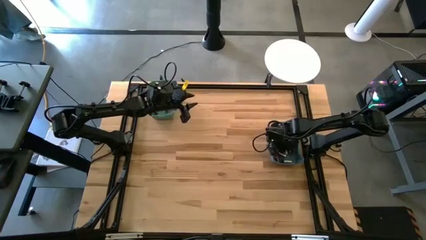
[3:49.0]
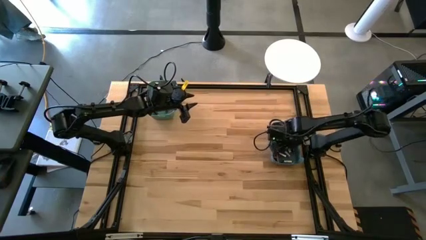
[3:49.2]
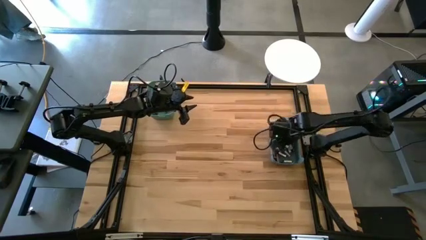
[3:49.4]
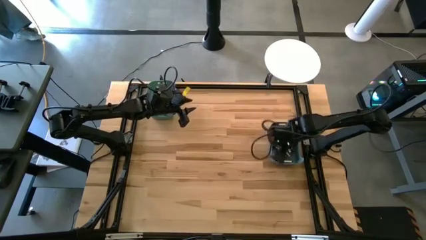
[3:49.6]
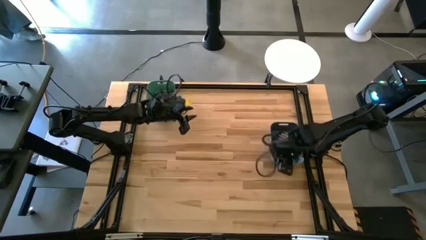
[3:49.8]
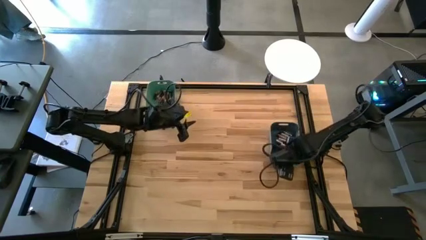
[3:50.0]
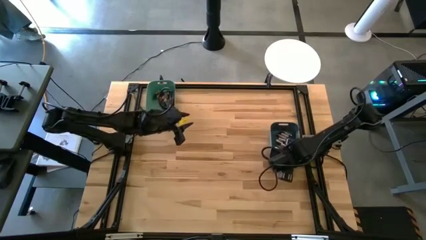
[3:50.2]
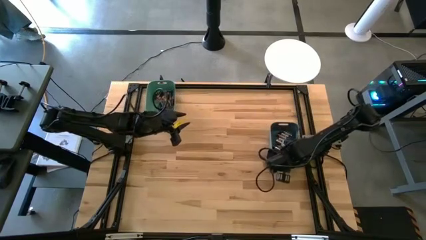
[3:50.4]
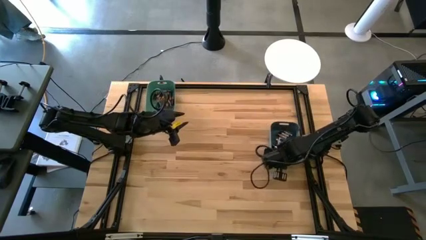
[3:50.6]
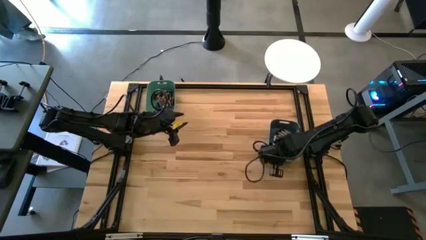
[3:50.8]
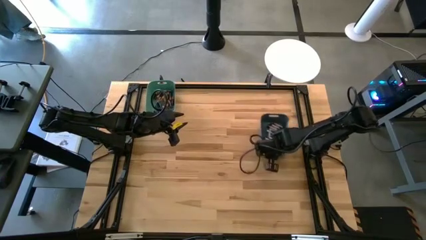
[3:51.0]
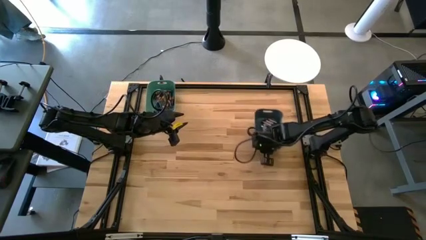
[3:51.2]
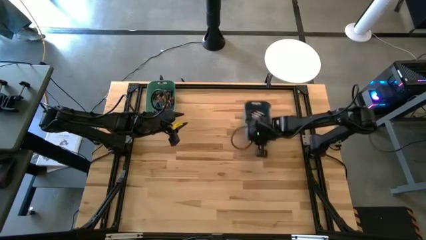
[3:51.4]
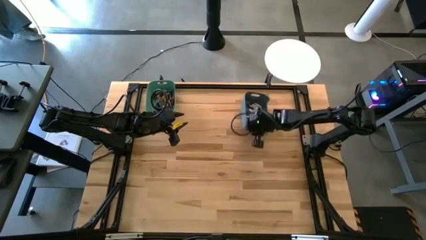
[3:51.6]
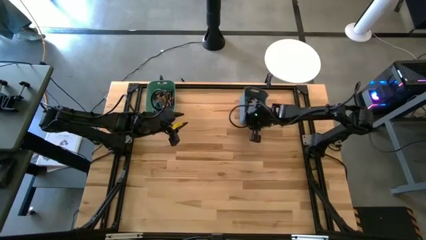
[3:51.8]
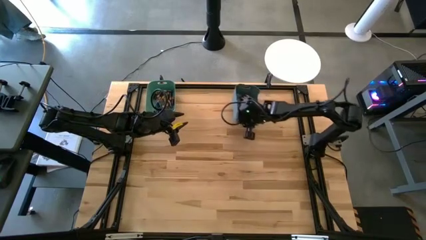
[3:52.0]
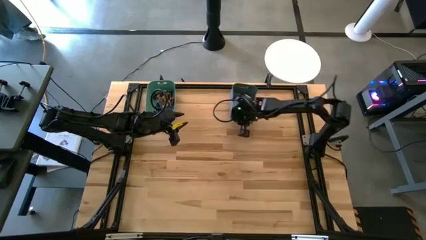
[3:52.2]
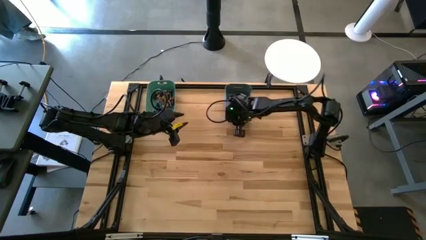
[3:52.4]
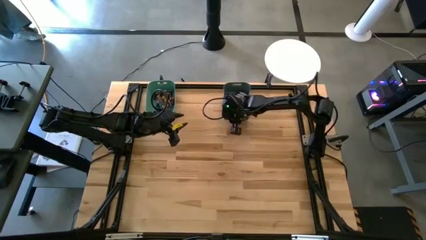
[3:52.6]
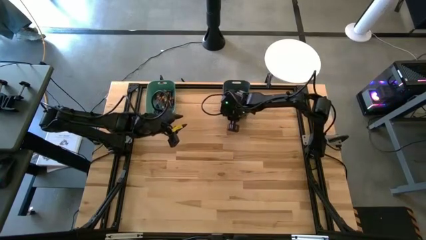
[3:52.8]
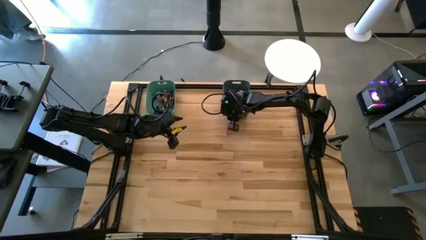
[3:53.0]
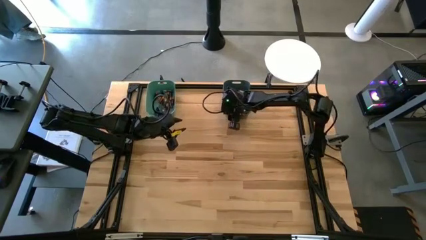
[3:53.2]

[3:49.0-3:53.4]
Task: Sort batteries
Move the blue bin to the top of the table

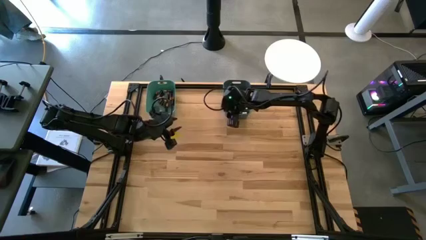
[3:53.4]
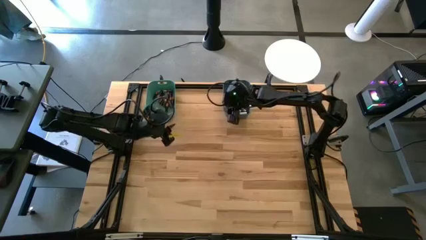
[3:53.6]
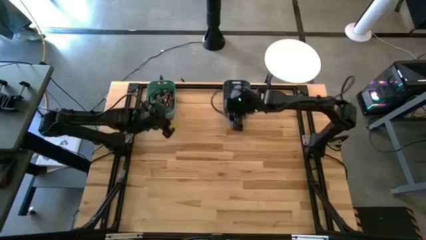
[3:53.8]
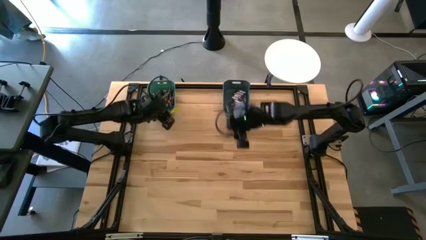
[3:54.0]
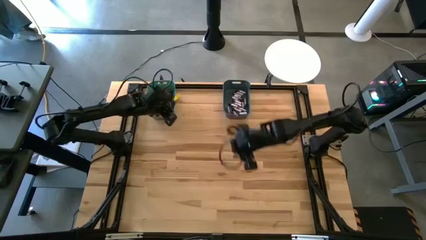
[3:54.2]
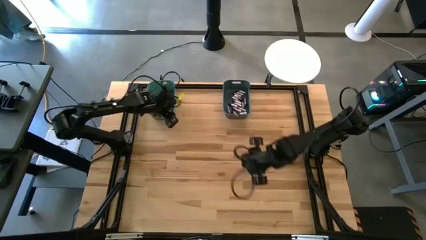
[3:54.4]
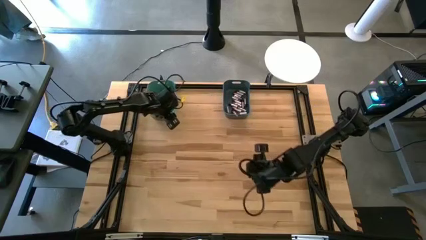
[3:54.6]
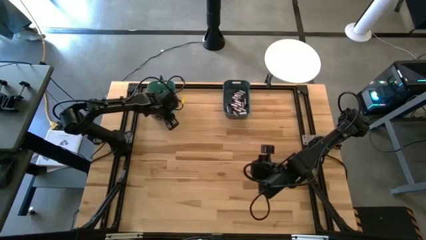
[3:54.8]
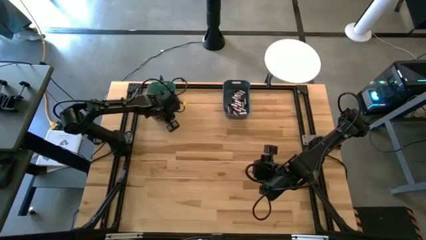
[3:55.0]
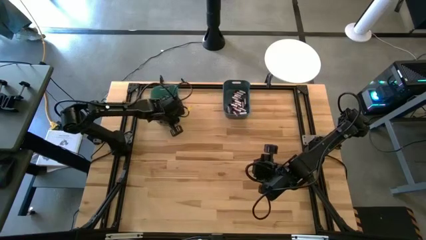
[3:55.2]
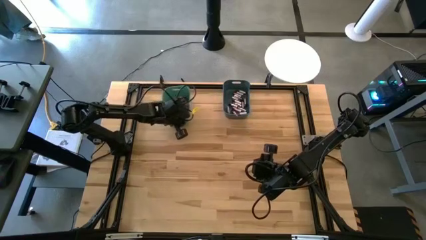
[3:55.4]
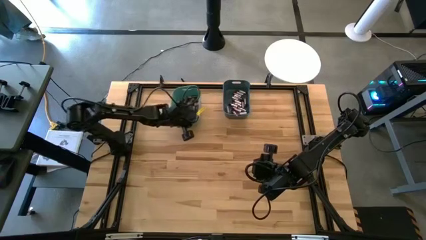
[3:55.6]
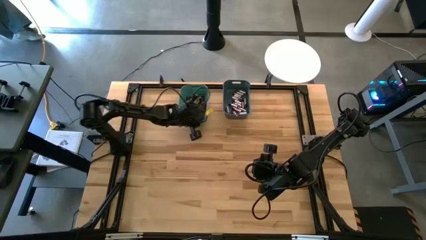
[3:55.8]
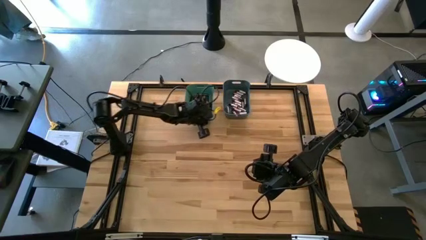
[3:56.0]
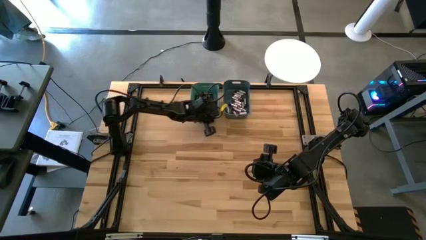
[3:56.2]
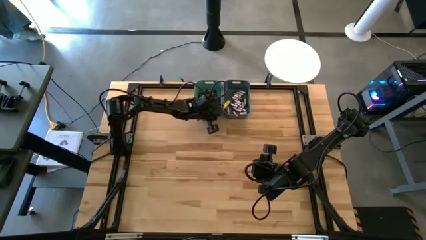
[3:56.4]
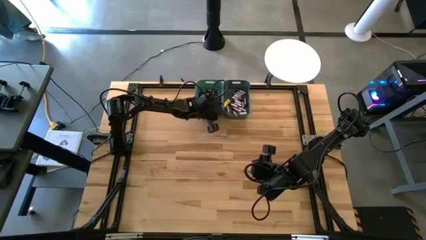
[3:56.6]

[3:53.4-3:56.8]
Move the green bin to the top of the table

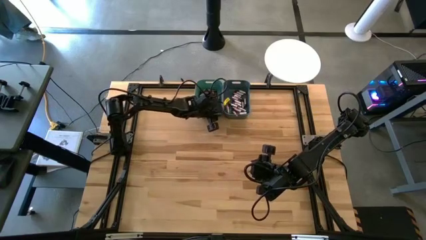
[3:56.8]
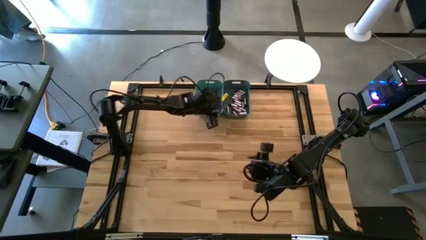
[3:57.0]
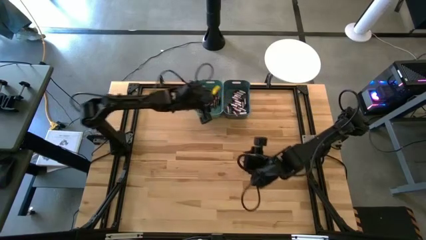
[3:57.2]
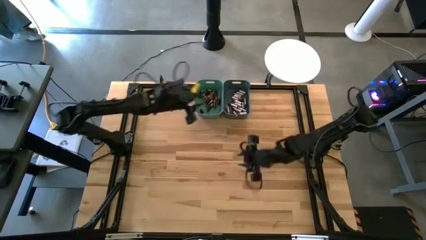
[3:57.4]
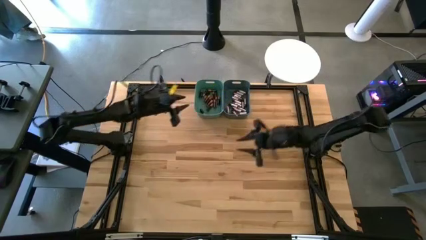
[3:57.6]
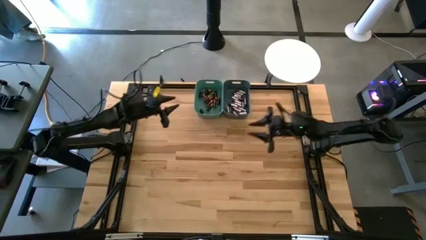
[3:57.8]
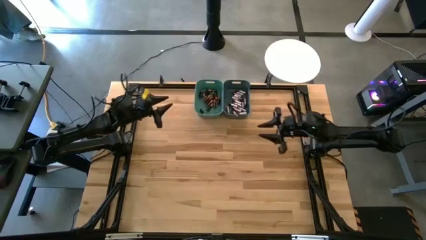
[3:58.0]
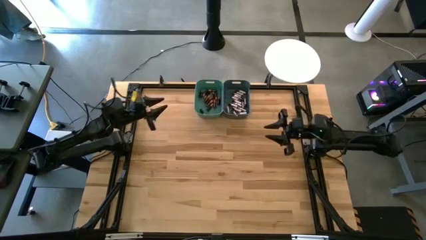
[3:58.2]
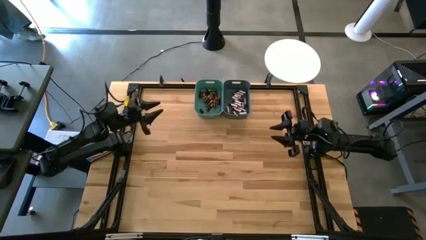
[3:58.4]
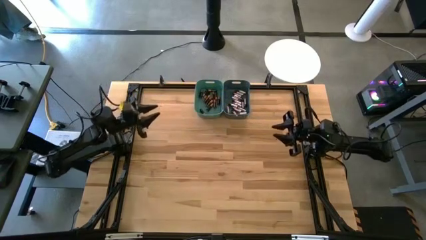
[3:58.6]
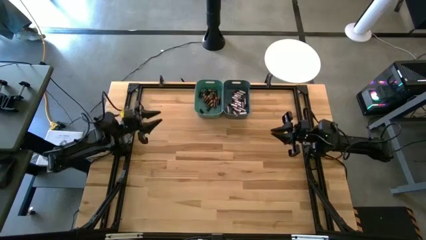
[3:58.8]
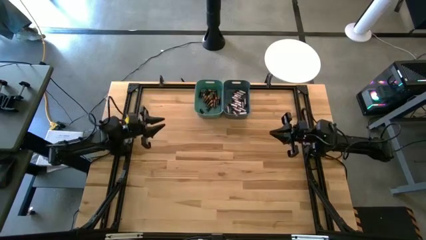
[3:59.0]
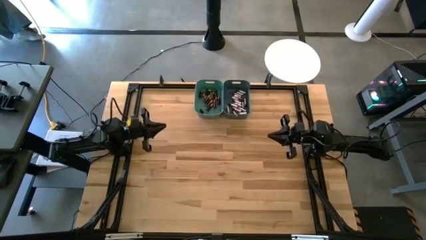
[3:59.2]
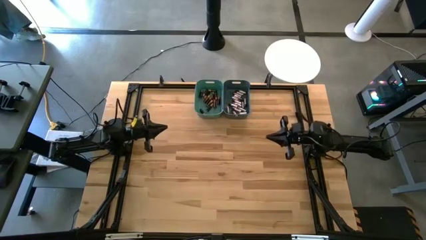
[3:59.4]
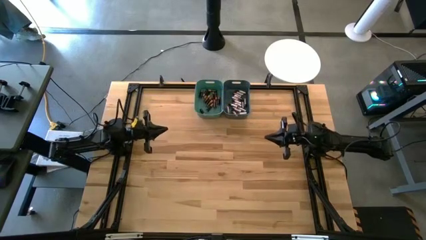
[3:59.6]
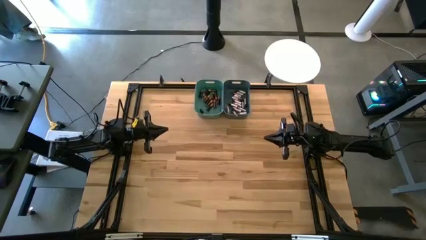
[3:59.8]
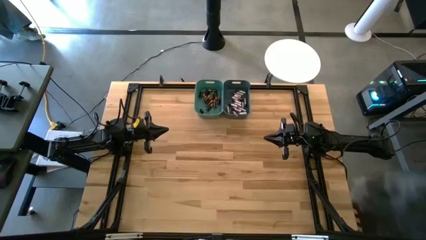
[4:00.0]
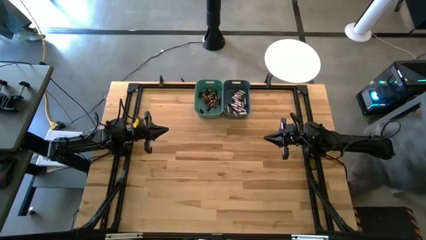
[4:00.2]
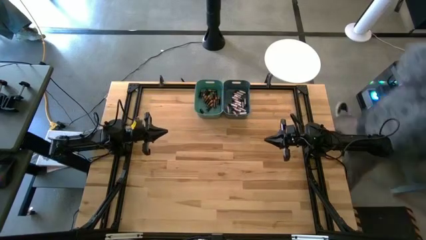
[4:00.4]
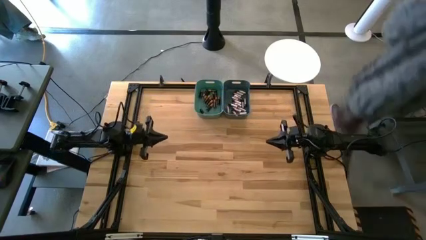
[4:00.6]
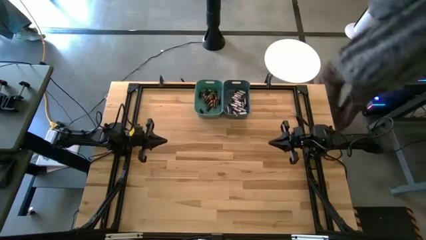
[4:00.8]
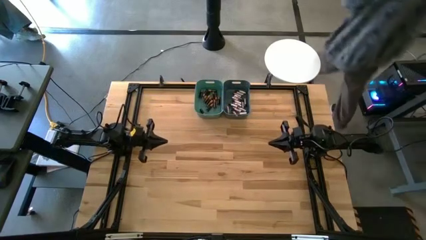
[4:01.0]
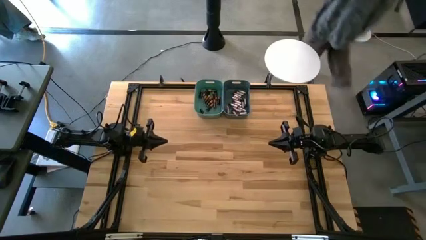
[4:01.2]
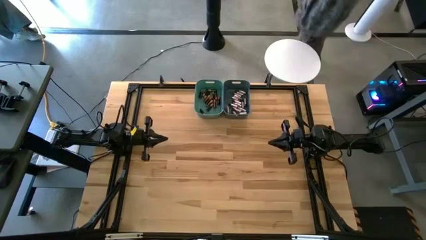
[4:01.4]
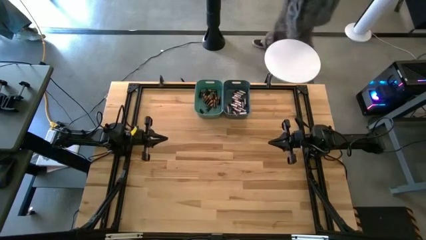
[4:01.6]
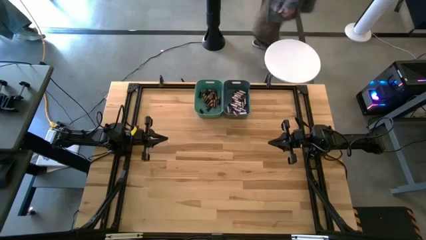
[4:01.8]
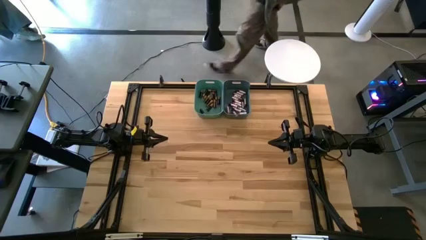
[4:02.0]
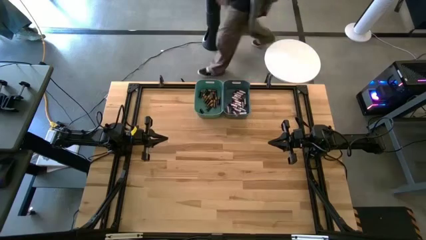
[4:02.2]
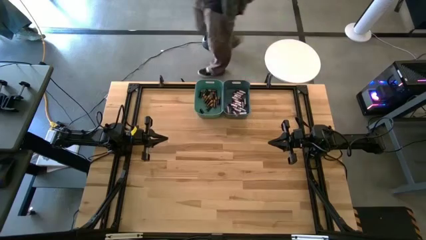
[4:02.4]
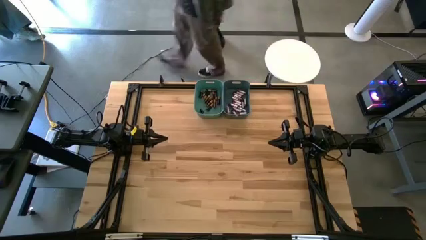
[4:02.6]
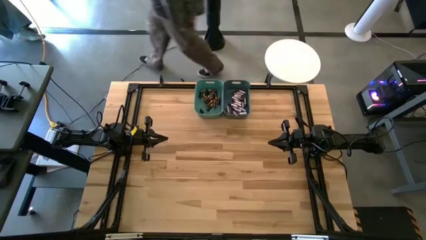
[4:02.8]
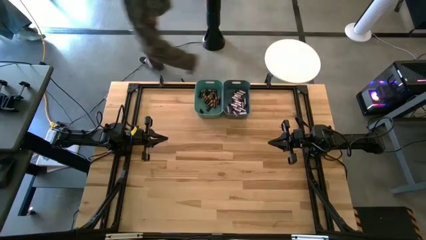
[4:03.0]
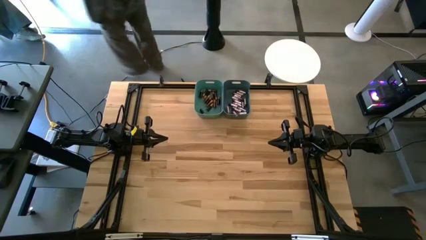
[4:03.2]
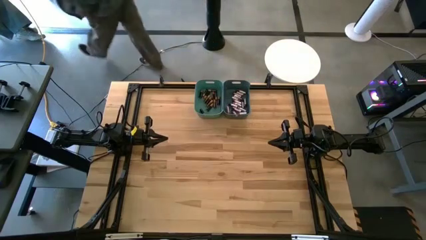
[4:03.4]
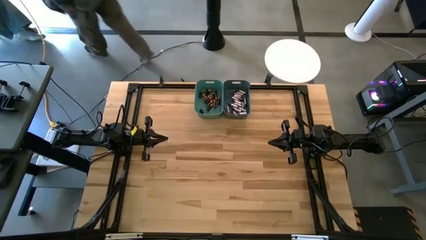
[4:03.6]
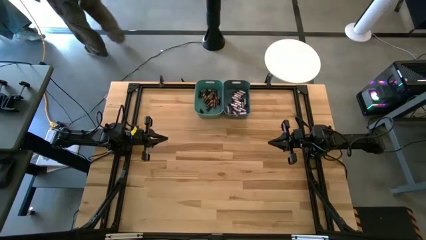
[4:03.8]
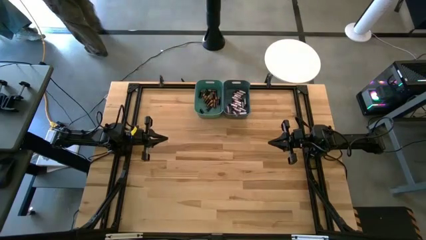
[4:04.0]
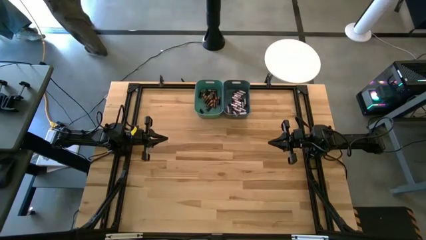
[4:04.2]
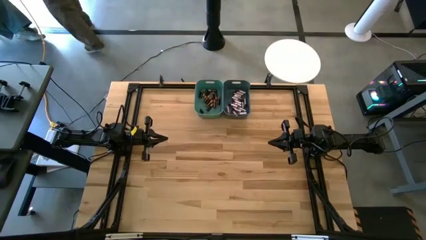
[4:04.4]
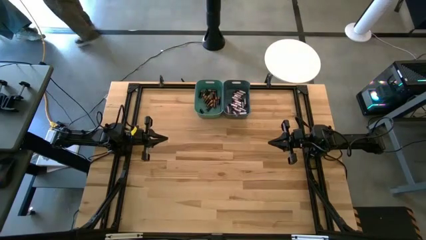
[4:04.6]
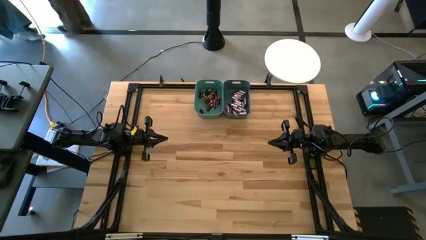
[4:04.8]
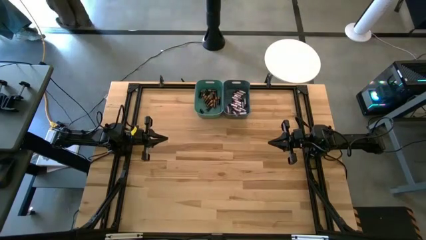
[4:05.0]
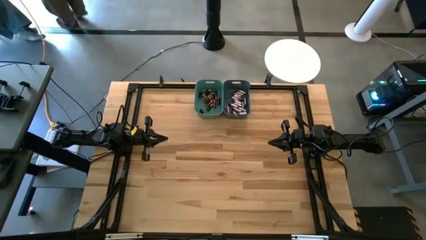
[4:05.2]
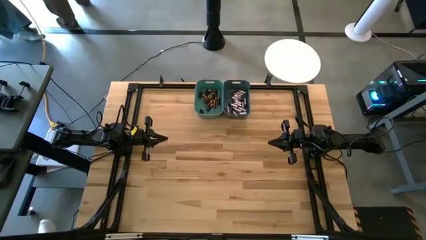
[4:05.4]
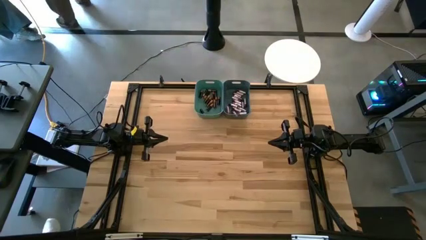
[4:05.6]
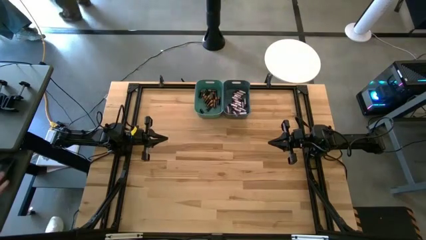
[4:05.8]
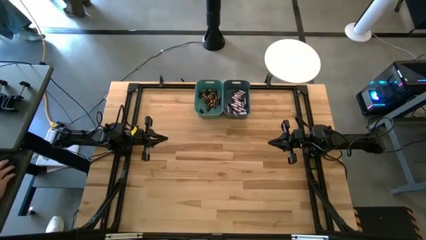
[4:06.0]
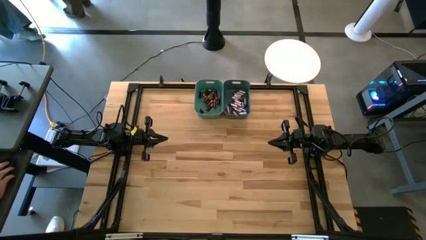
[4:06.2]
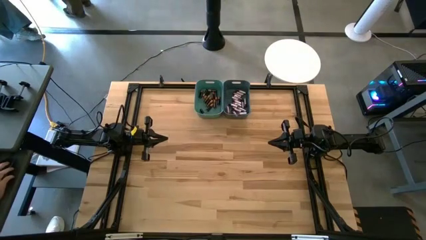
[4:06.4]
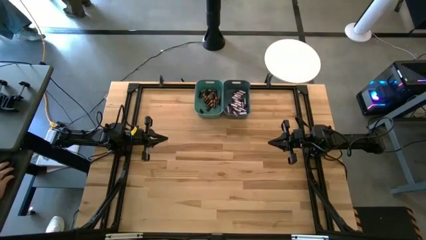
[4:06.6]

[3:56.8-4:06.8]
Return to Home Position
